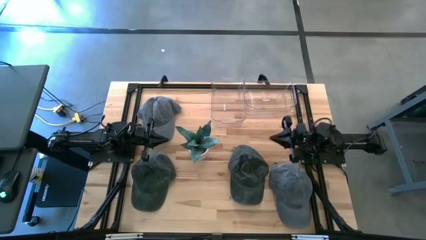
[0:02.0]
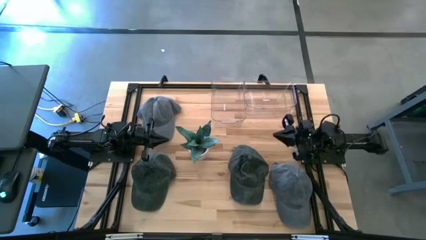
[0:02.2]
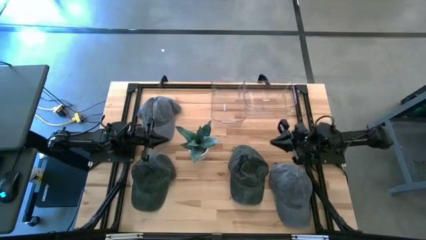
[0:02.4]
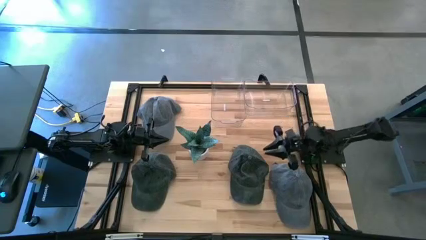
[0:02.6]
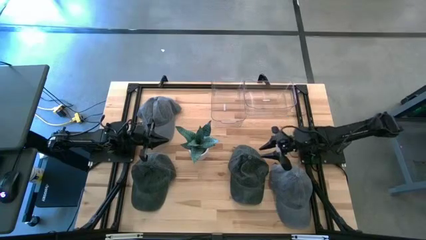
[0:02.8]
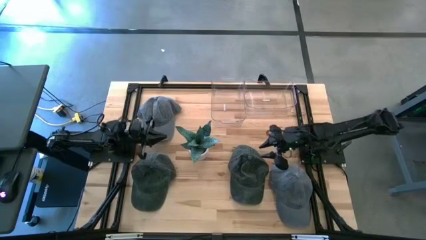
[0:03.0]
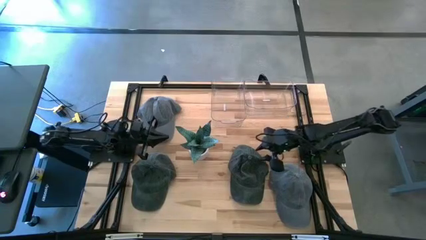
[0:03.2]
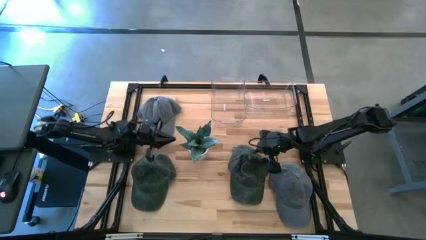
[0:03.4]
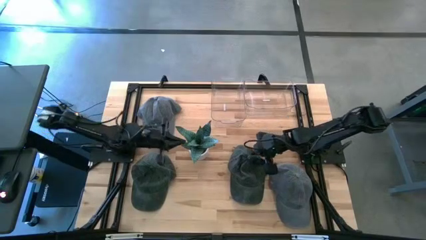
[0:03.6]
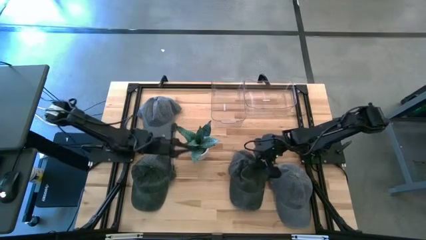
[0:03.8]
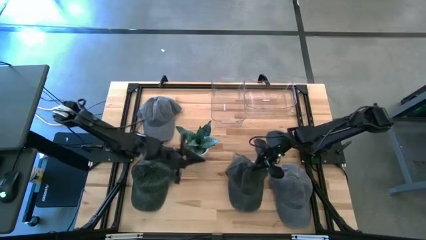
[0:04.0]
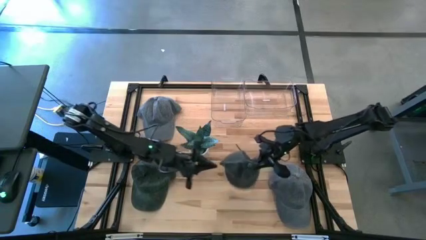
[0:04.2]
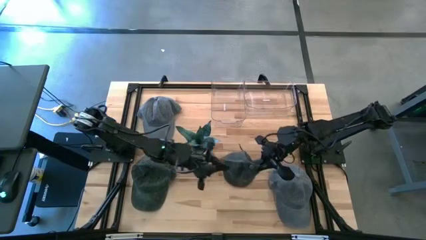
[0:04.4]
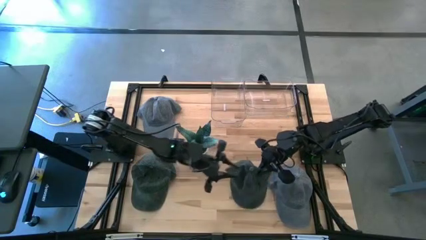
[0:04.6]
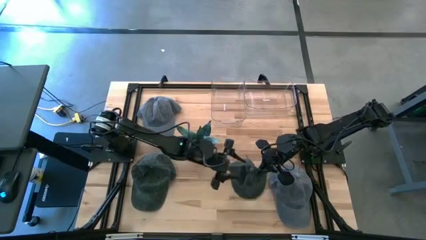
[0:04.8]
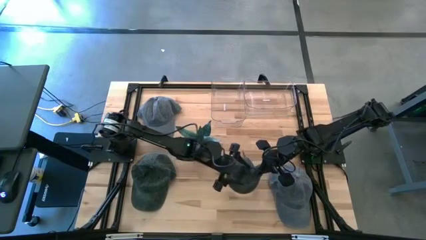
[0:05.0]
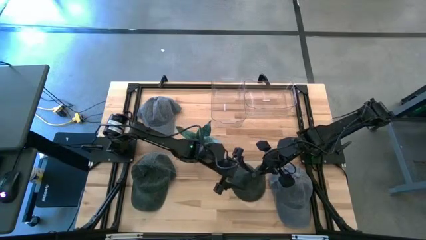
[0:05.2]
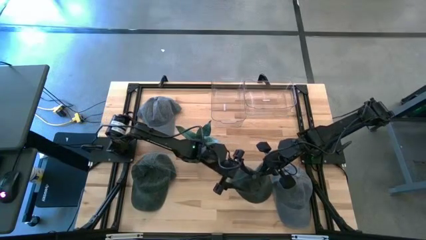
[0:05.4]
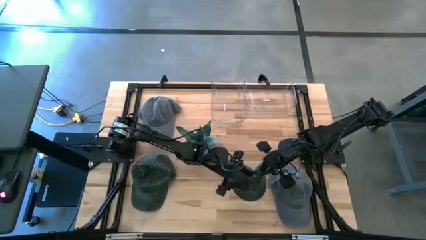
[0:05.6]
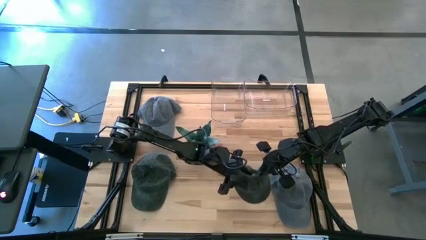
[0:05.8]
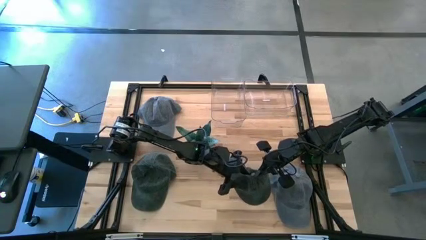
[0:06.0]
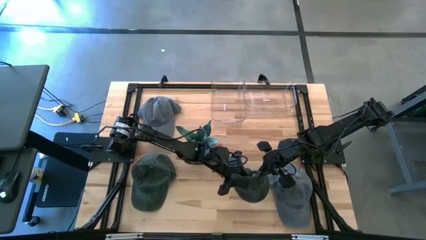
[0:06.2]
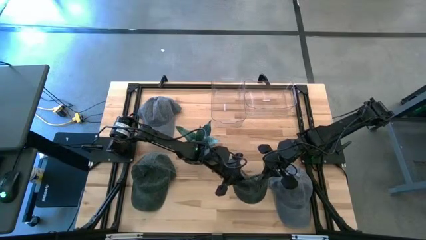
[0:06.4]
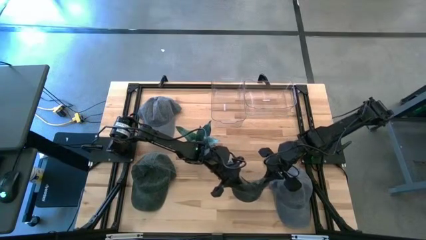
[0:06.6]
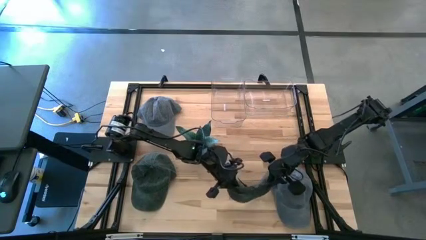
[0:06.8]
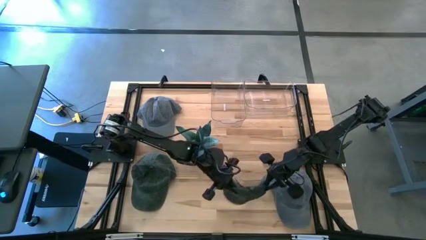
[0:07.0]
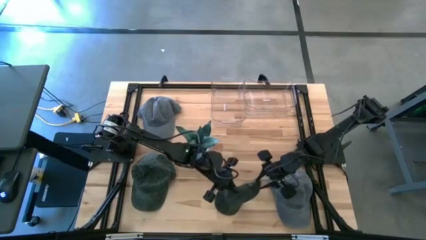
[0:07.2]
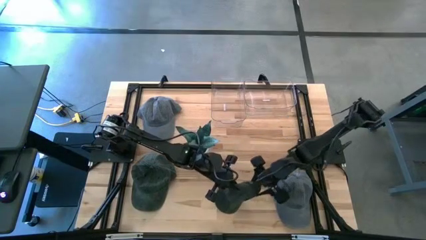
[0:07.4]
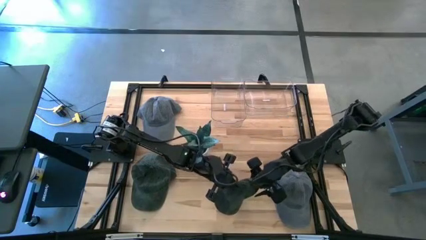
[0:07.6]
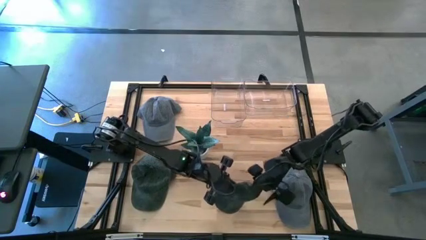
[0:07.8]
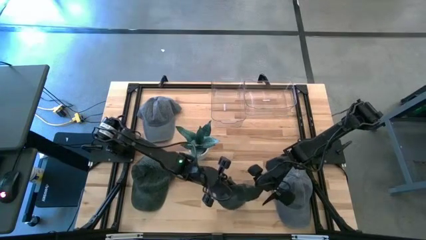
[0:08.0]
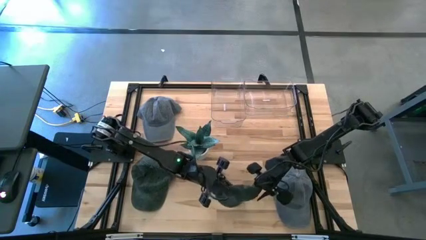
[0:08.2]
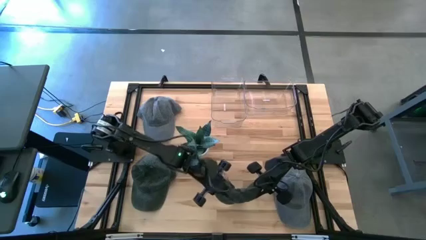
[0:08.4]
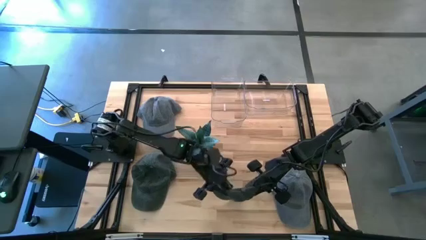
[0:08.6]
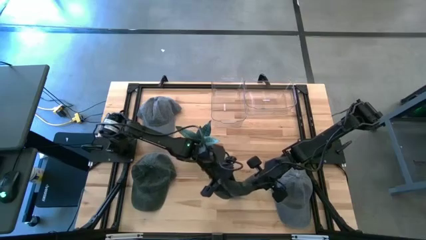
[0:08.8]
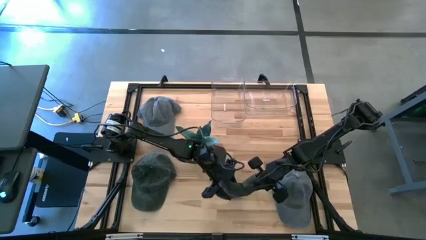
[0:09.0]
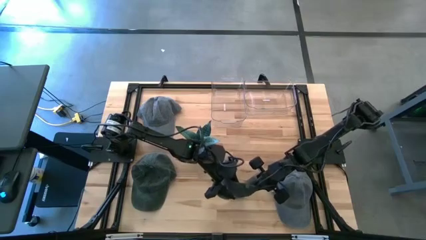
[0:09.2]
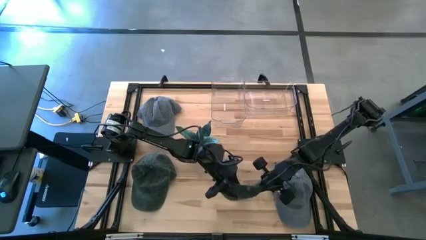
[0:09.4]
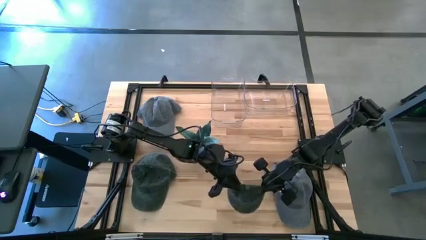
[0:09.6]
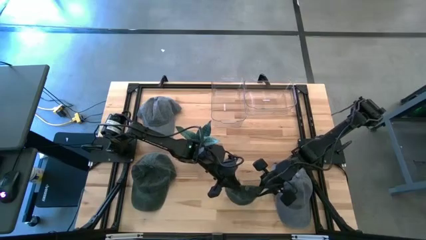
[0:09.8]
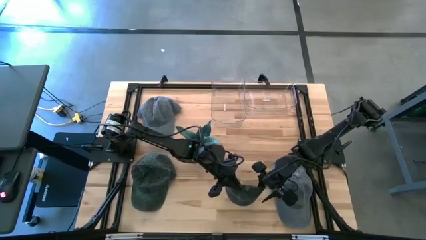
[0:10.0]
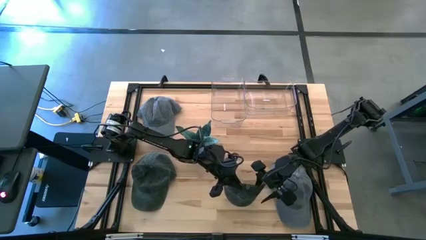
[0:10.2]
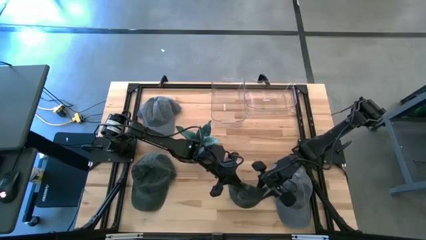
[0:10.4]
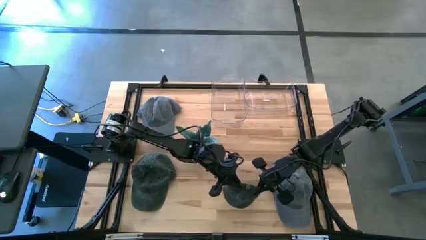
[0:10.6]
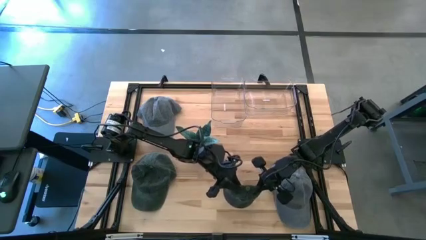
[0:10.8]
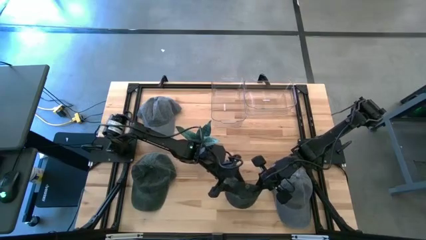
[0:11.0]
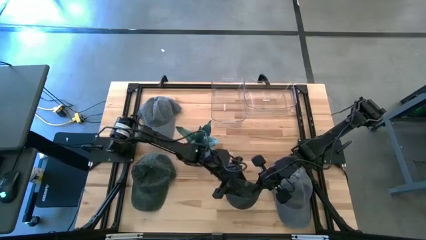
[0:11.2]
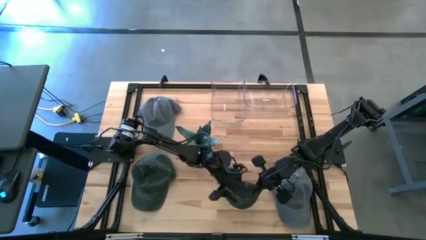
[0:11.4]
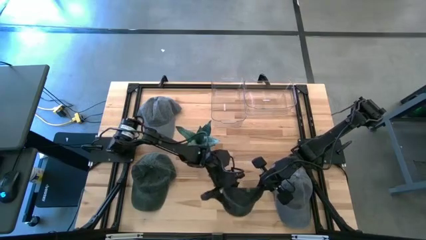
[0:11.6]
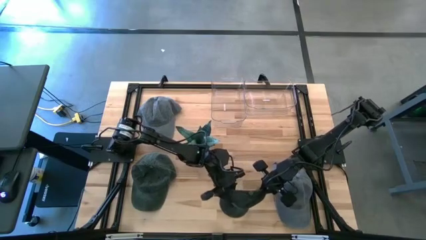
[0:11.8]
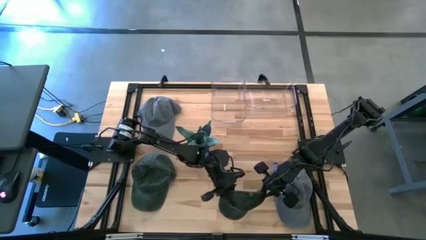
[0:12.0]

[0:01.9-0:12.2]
Task: Pick & Place hat
Put the right green cap into the left transparent bin
